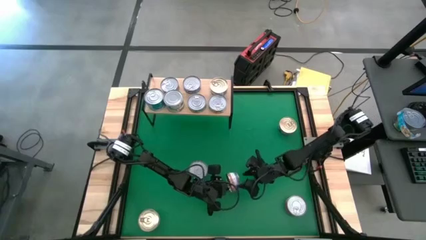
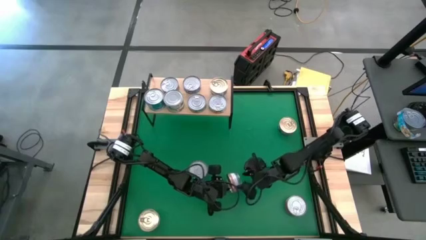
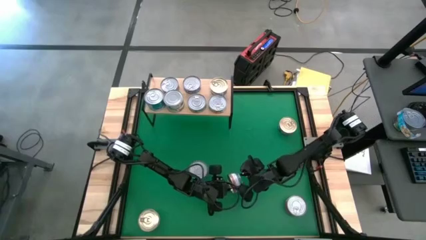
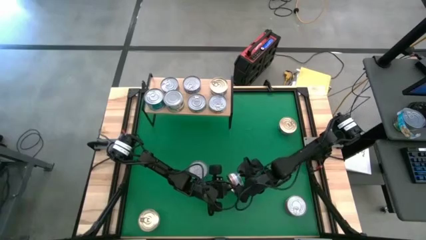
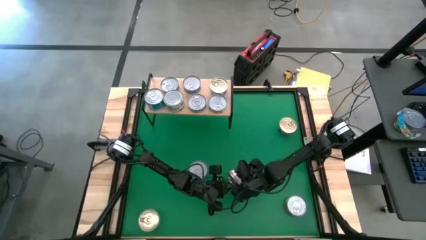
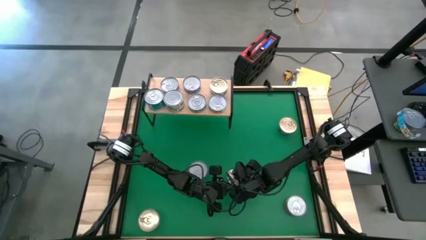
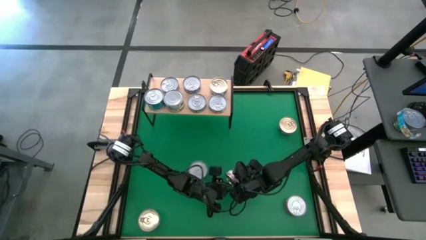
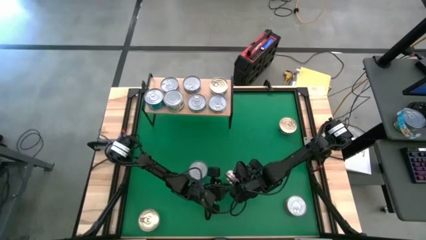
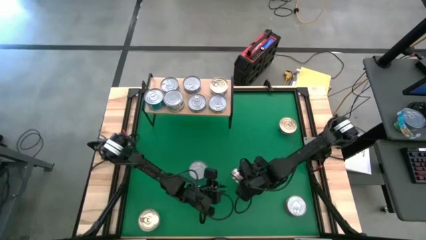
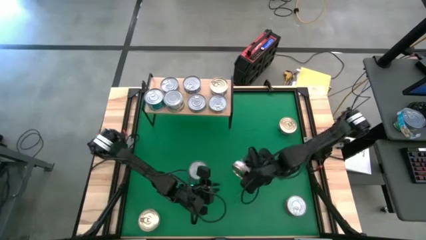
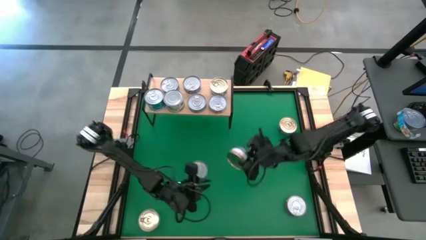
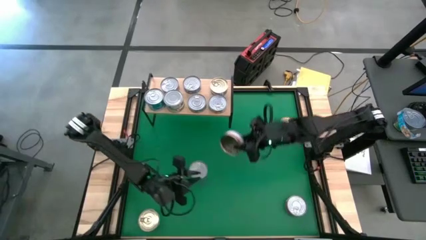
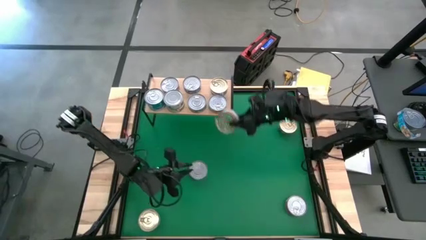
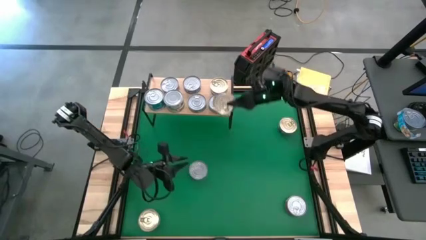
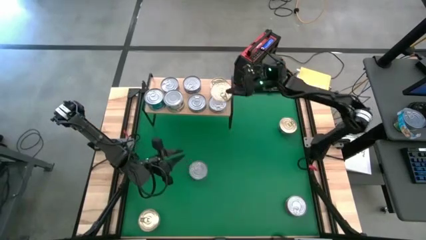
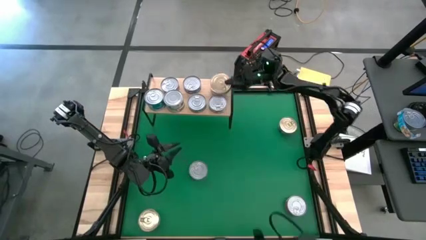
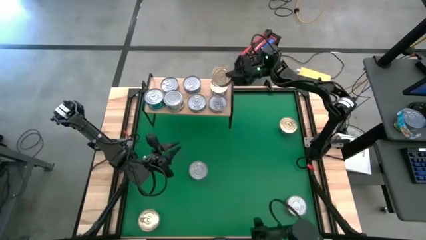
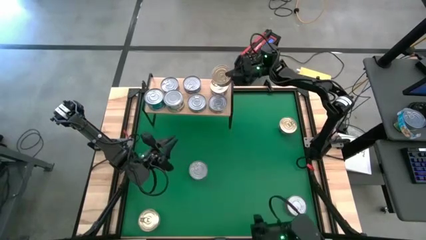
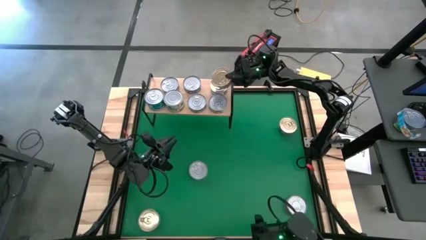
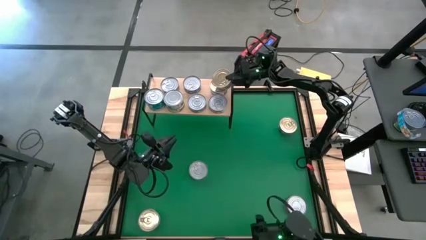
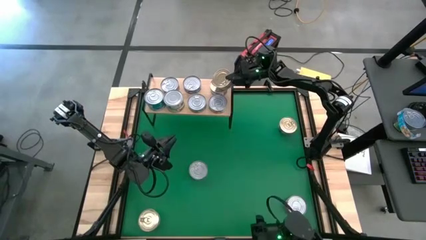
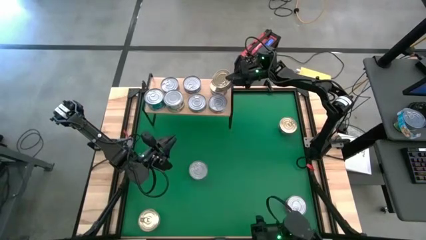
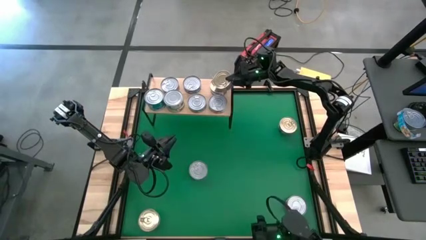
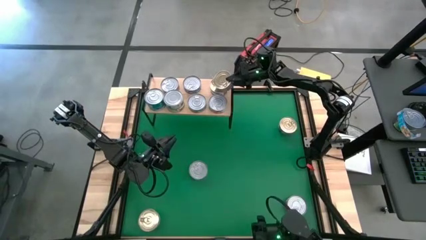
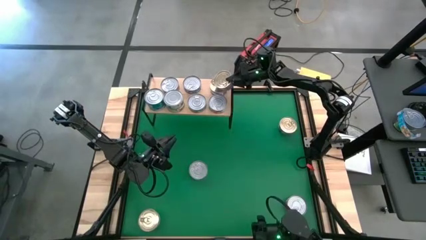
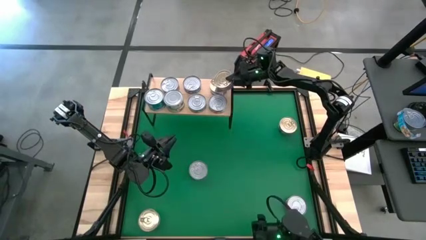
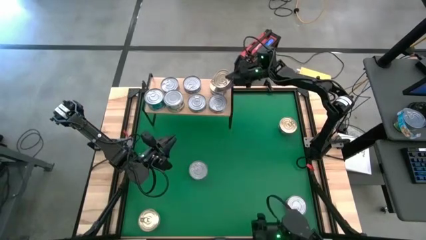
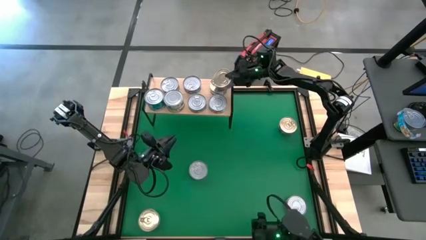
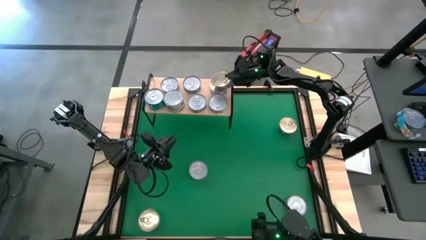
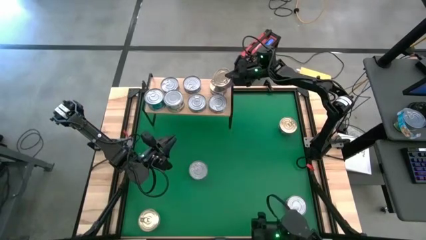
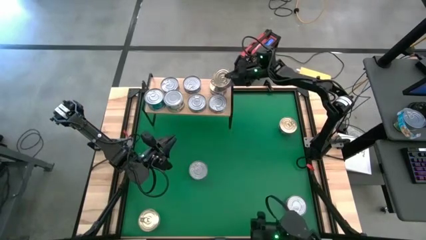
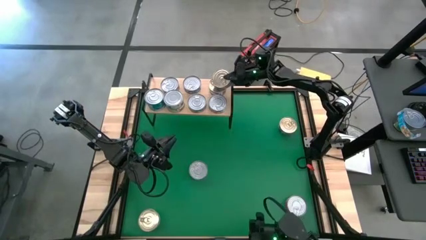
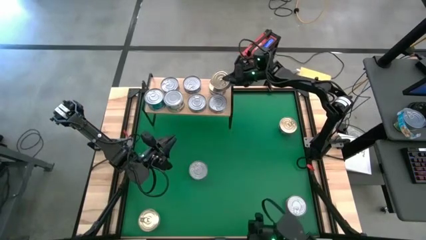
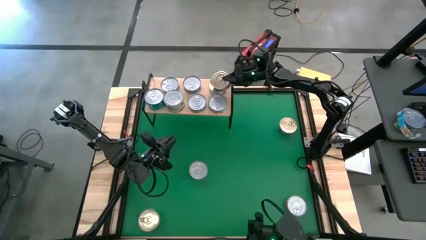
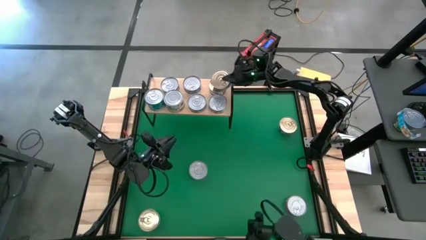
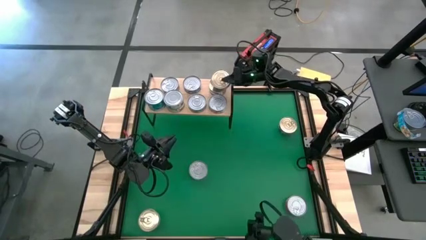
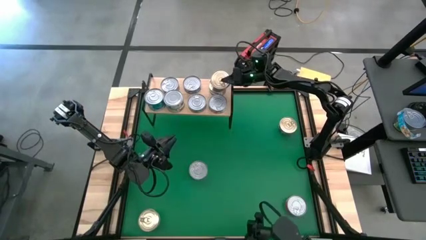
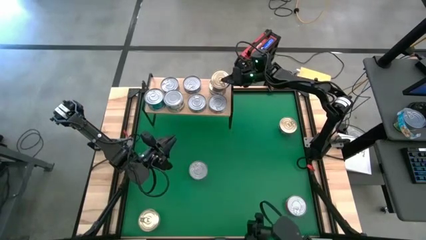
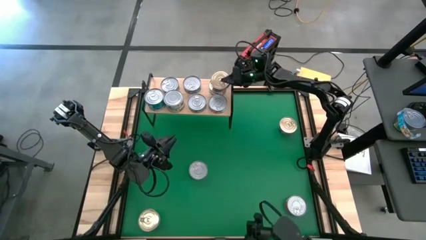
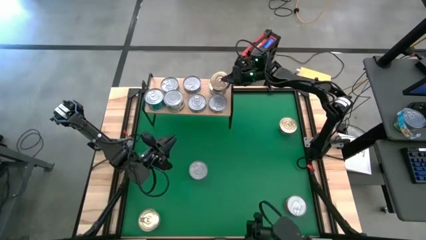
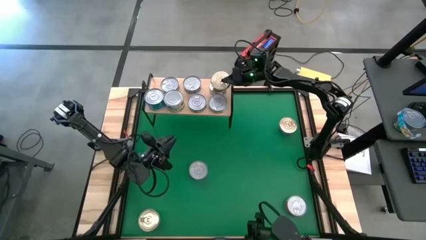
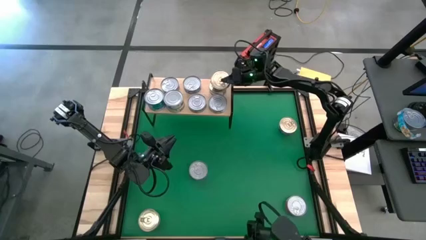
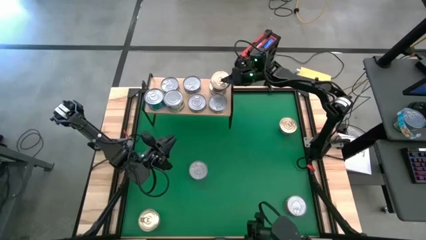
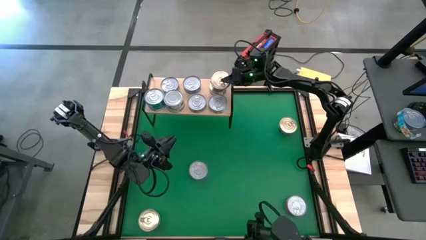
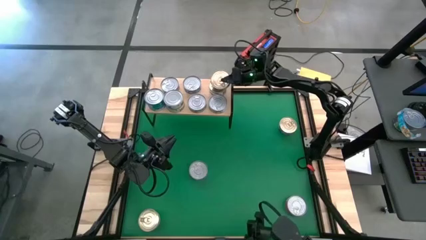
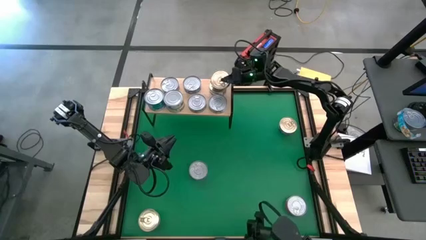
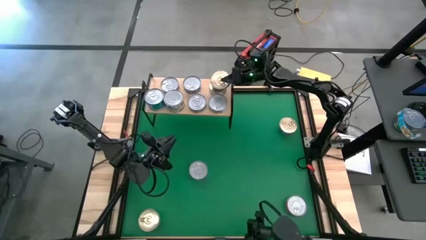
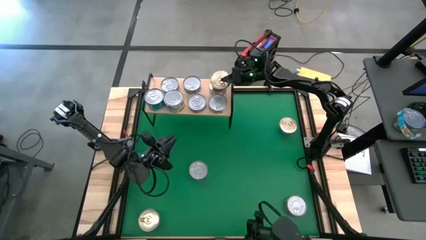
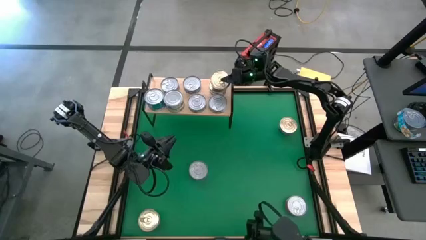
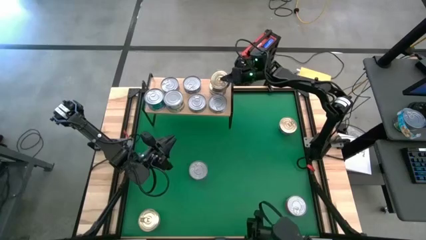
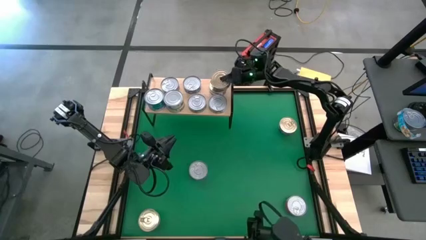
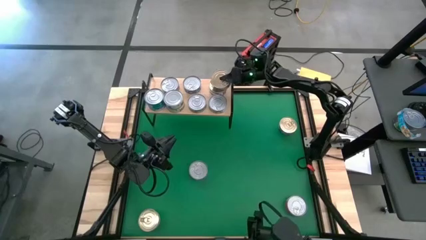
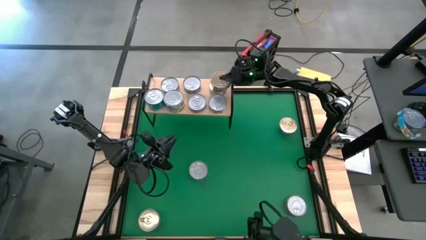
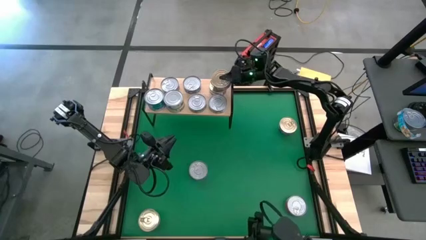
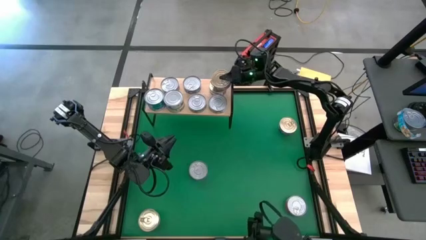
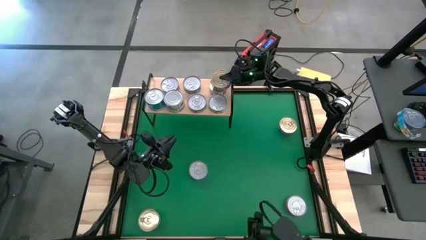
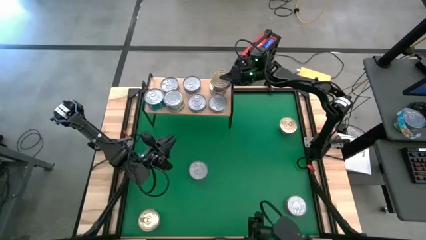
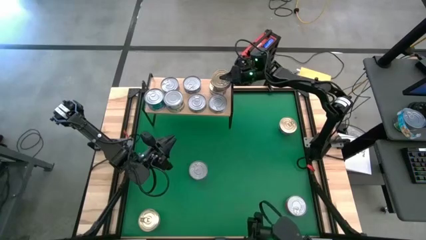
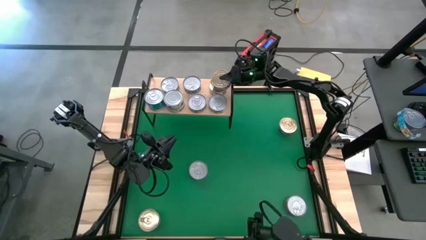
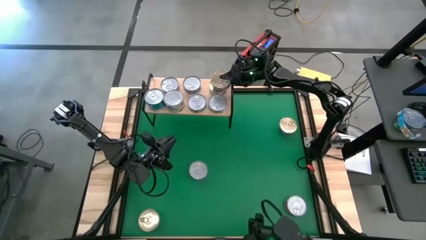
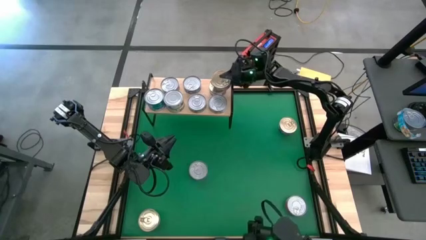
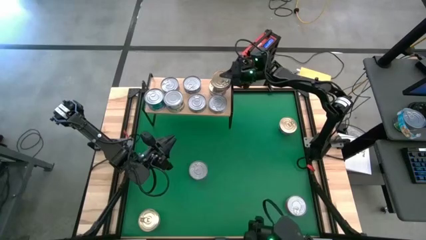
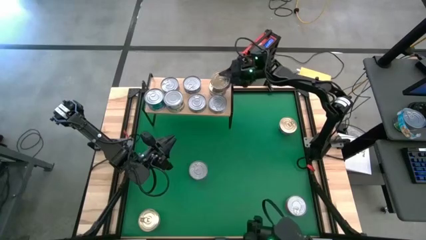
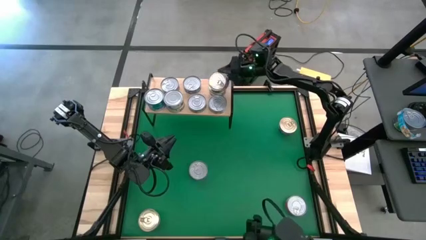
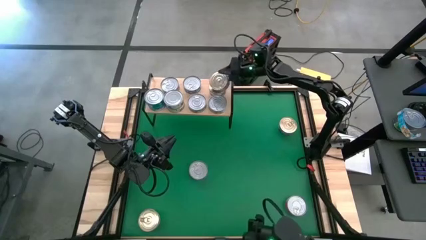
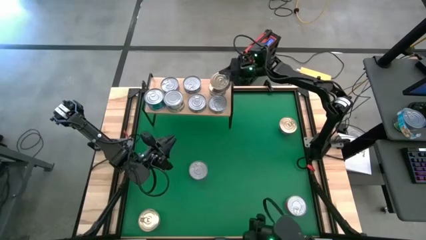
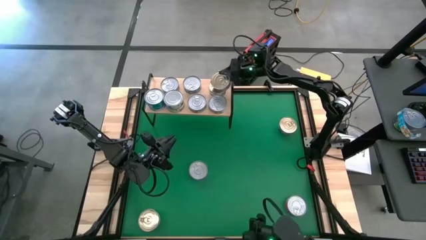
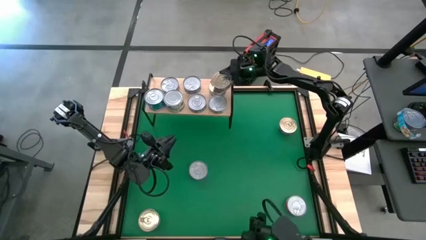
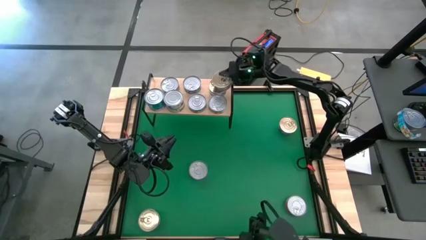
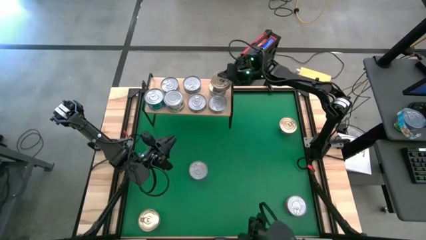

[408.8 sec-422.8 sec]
Task: Stack canned seafood by type on shelf
Stack the middle right blue tuna can on top of the blue tuna can on the shelf
